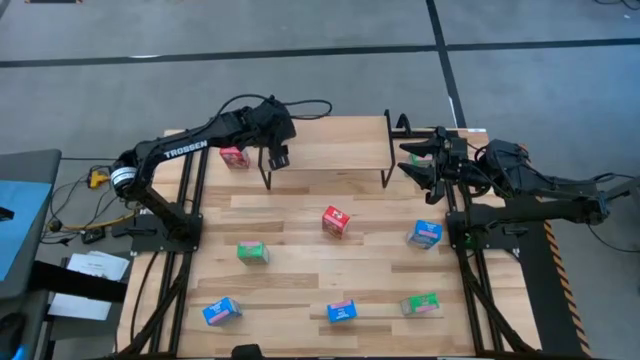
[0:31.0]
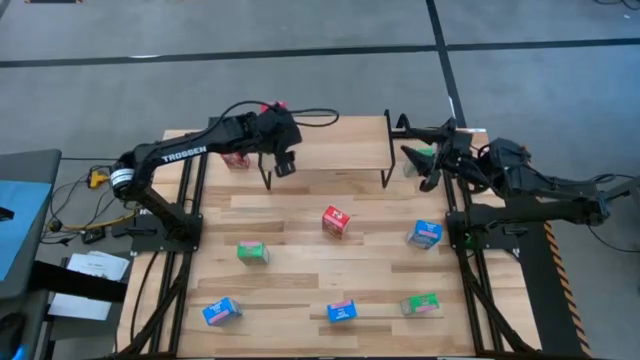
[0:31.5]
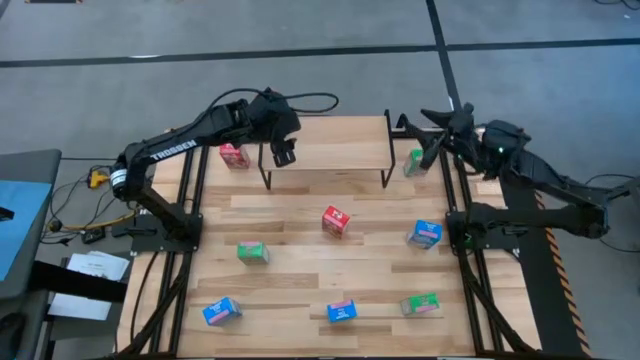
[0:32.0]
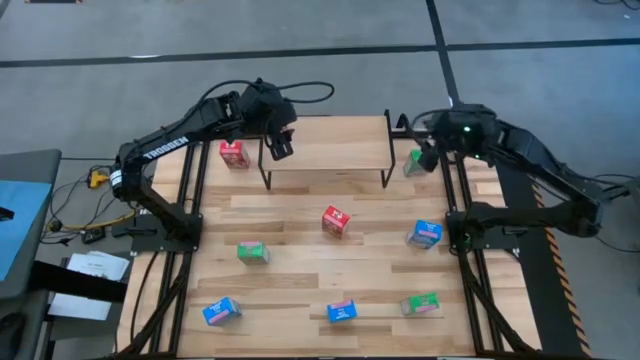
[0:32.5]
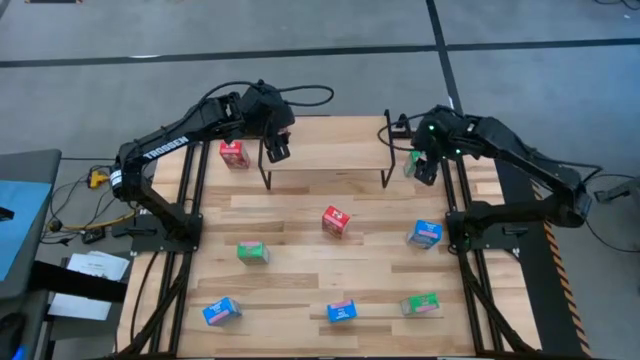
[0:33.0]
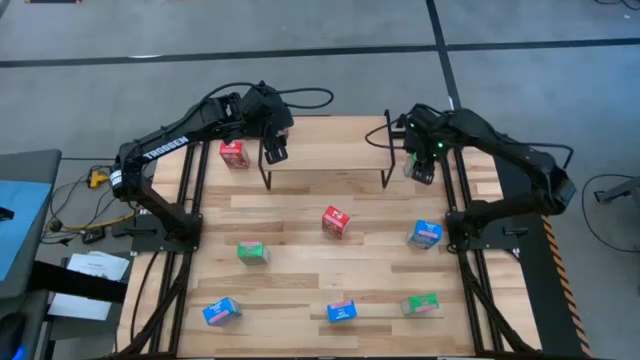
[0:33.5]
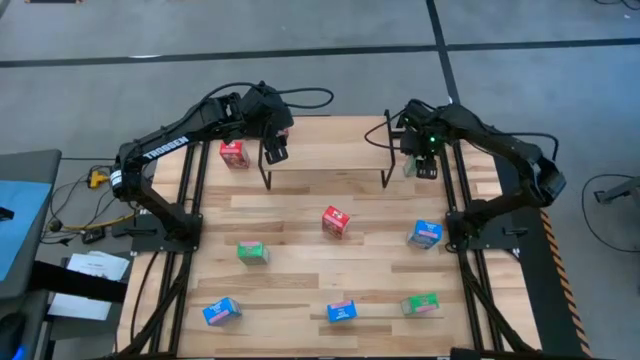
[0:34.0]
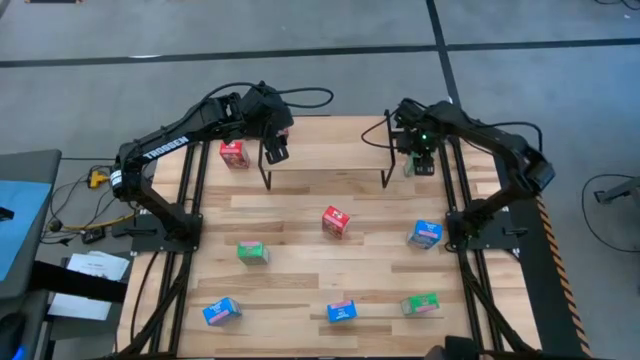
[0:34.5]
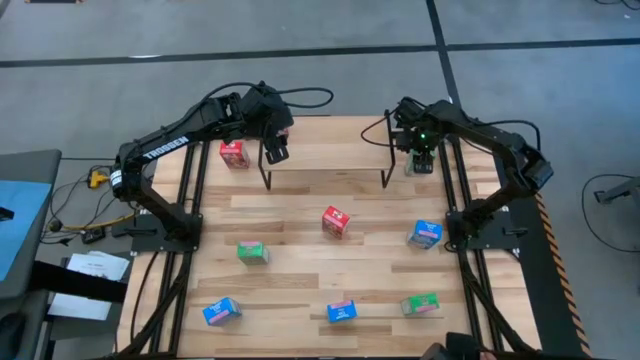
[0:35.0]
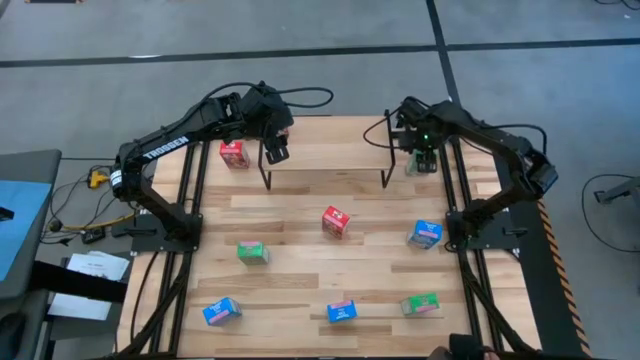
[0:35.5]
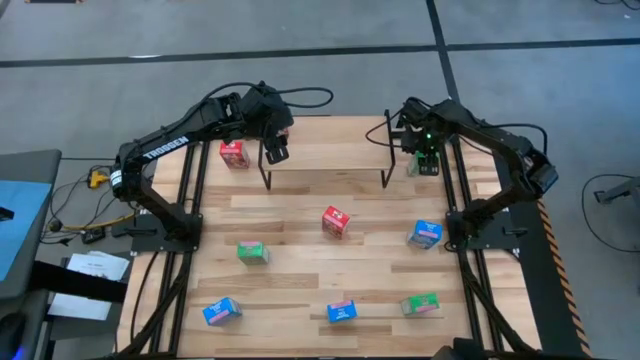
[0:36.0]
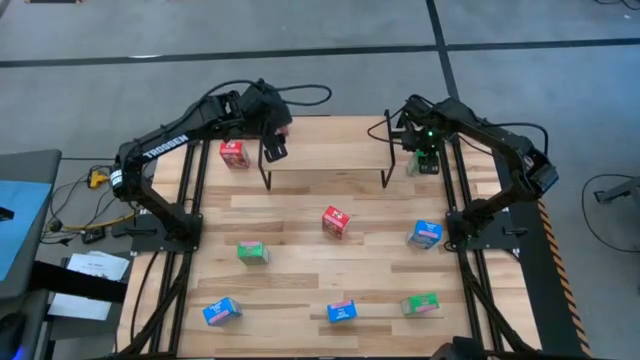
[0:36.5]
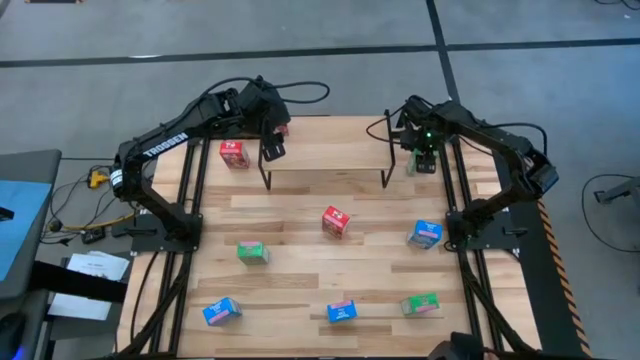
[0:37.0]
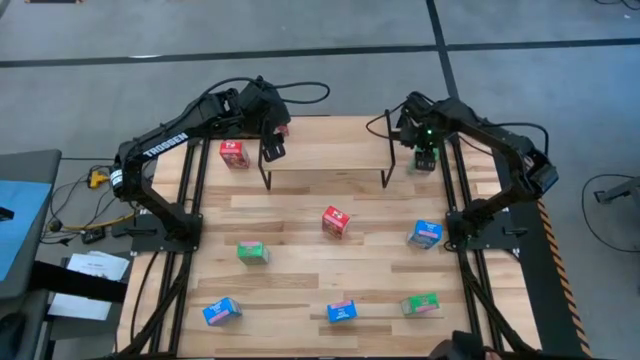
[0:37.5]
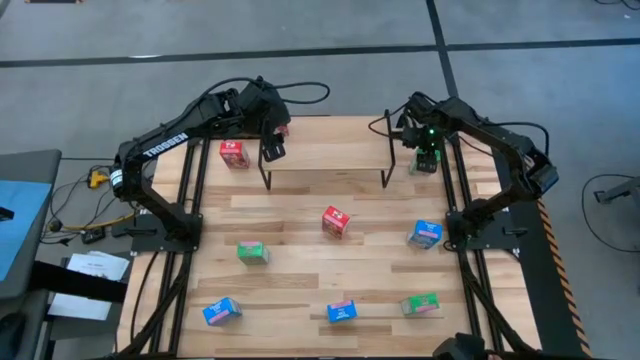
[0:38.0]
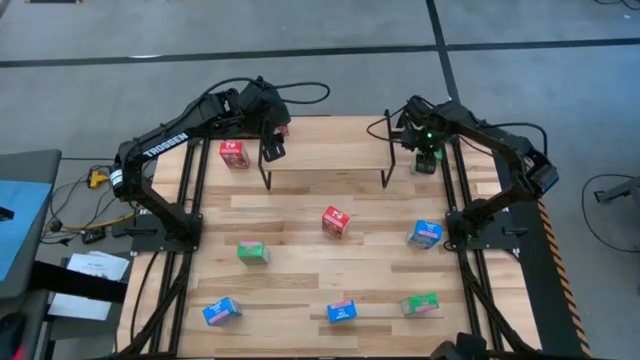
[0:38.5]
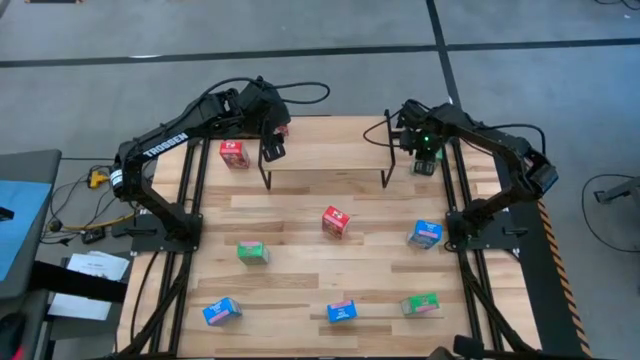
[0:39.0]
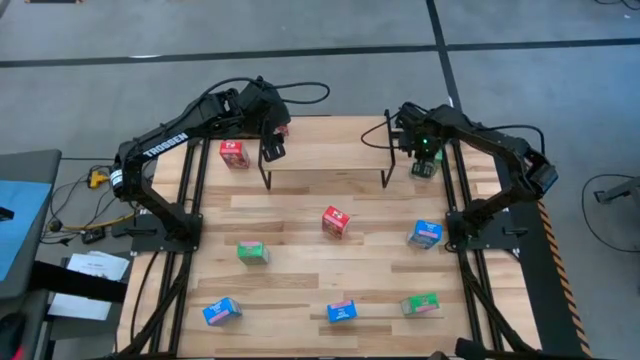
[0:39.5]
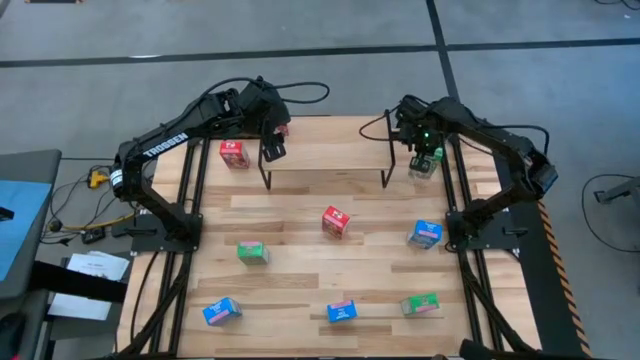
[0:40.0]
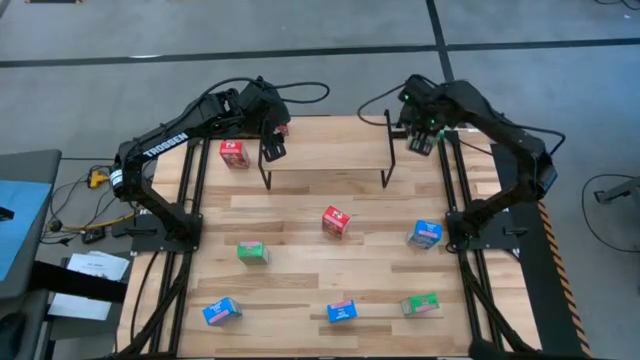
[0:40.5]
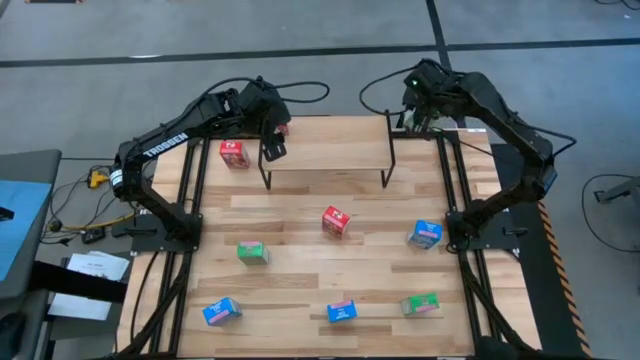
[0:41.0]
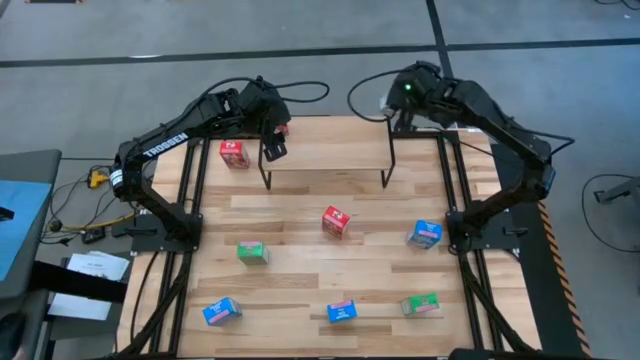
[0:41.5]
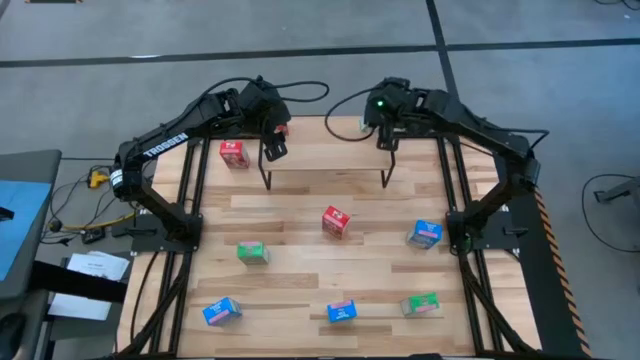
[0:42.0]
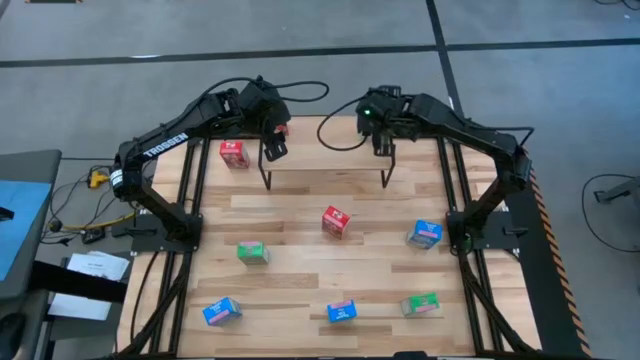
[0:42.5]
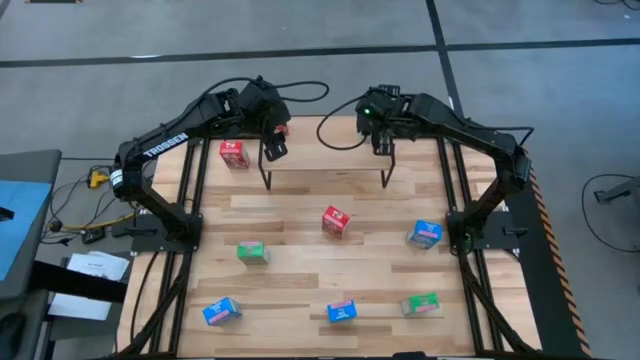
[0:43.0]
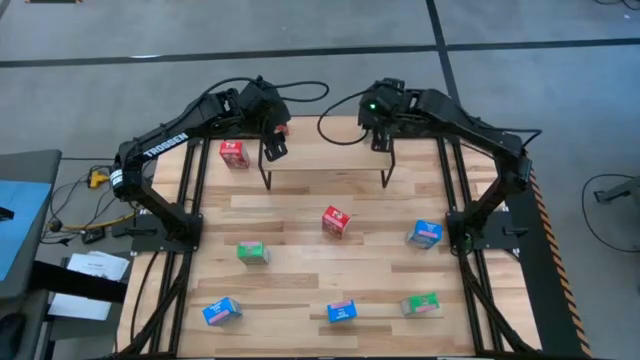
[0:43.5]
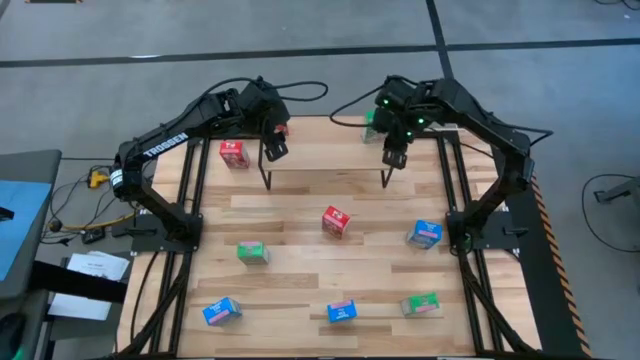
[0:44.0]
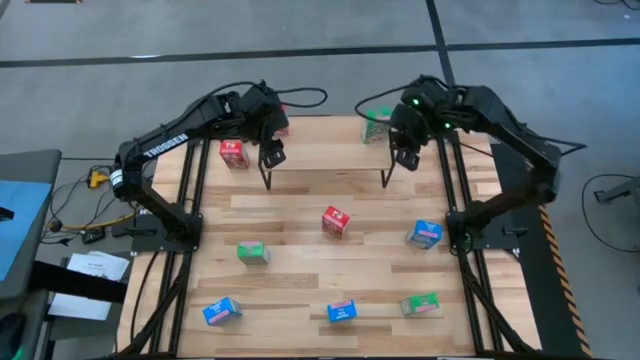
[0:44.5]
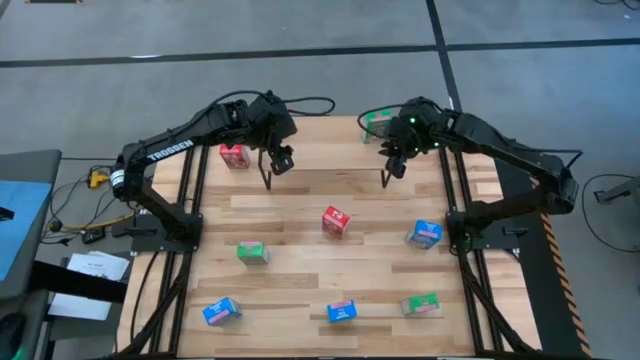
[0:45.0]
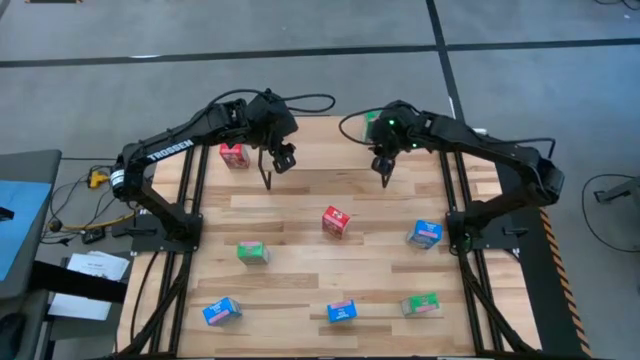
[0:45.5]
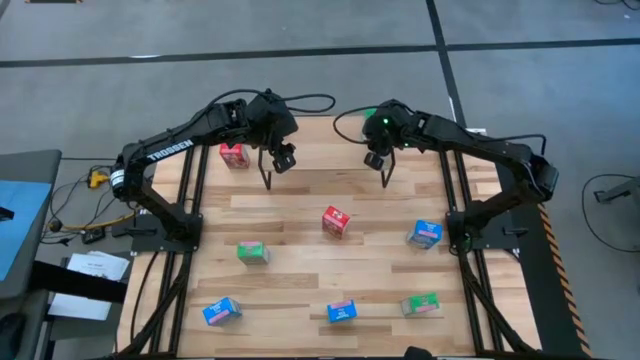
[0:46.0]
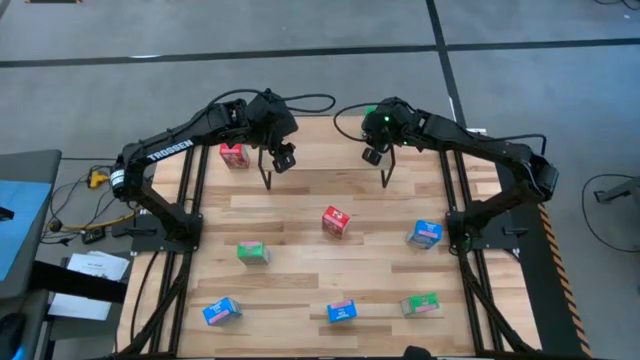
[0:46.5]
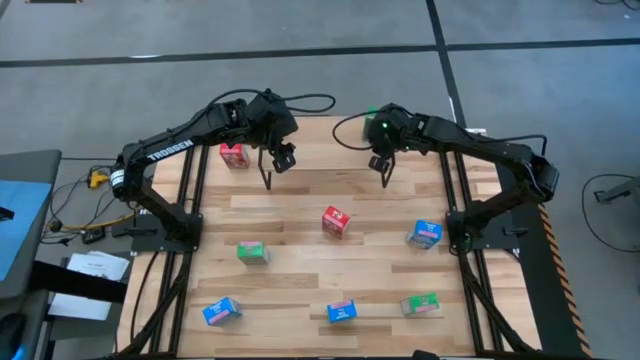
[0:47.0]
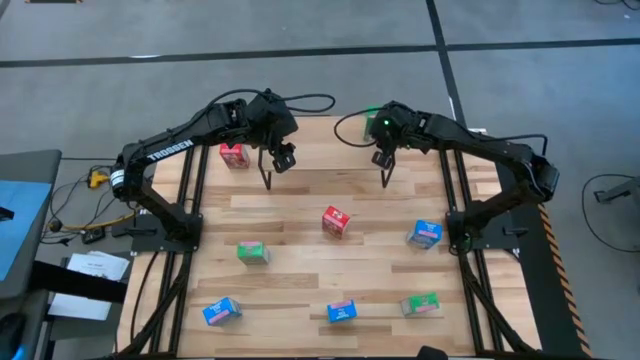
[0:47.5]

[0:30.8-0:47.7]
Task: Stack cereal on shelf
Put the top right green cereal box on the shelf

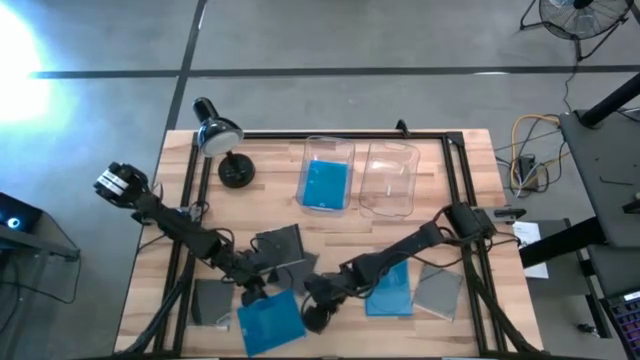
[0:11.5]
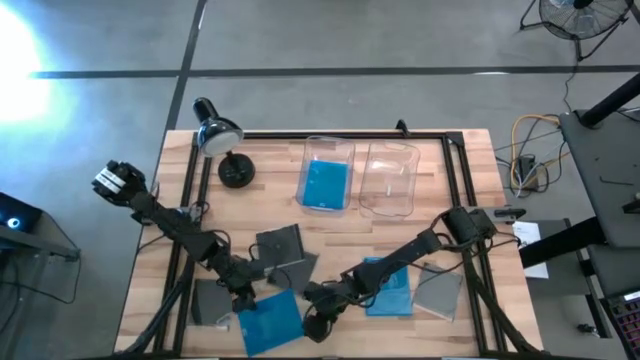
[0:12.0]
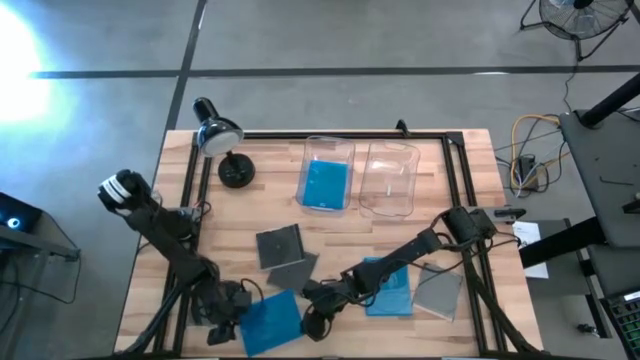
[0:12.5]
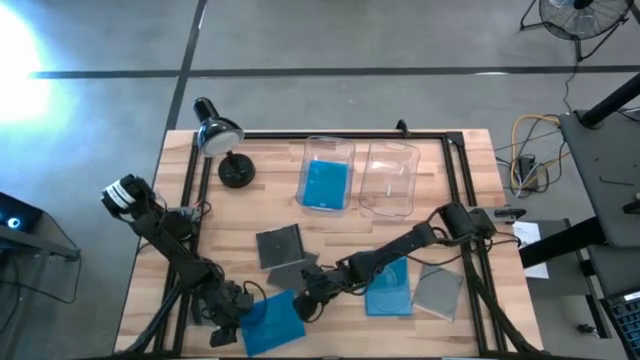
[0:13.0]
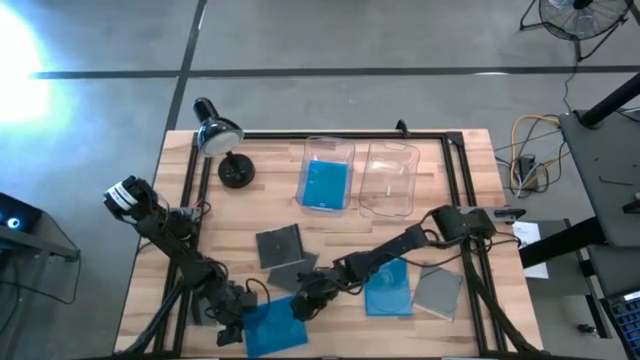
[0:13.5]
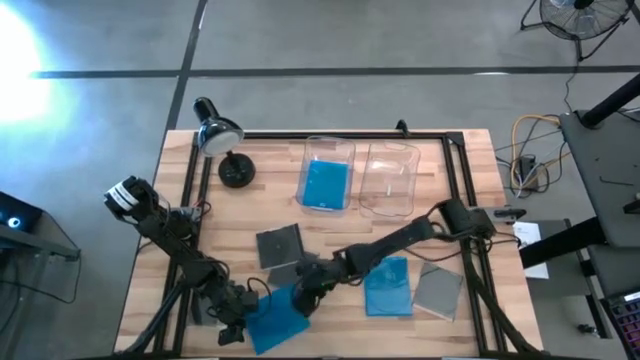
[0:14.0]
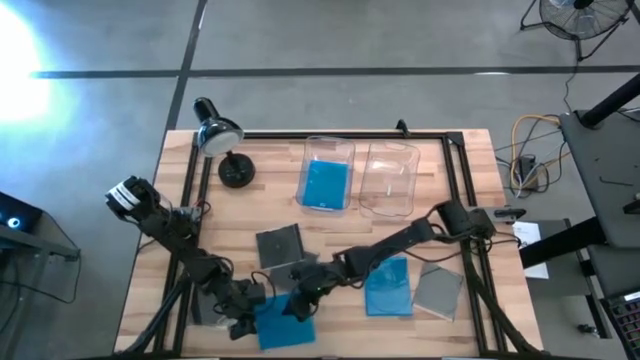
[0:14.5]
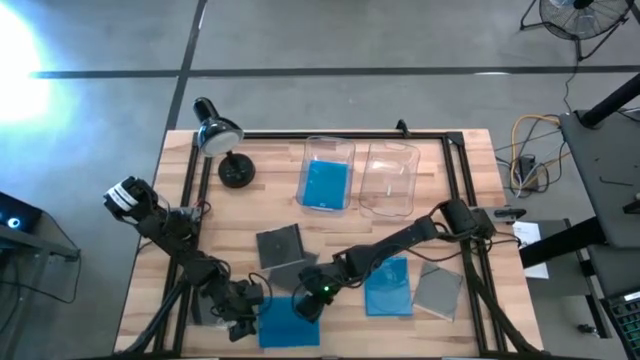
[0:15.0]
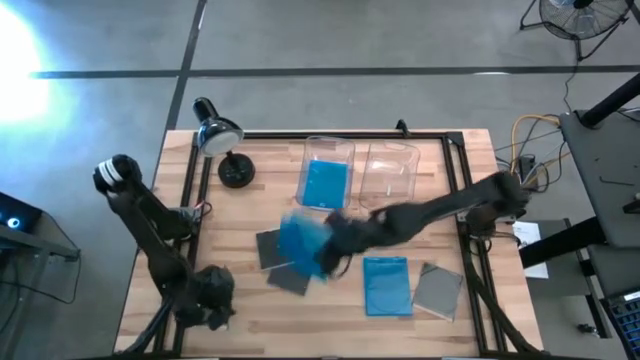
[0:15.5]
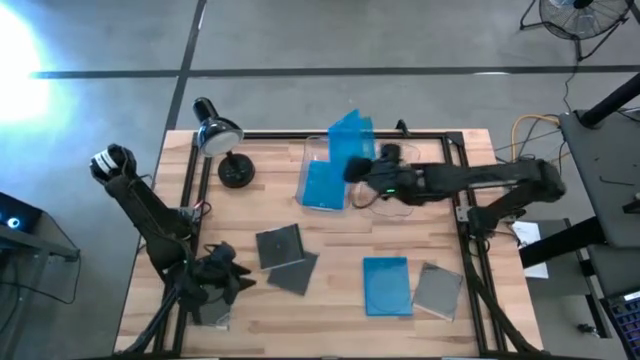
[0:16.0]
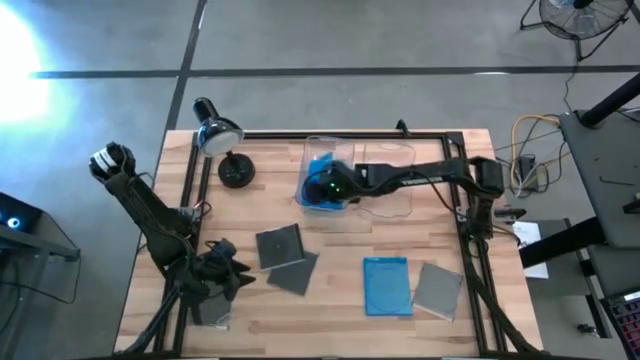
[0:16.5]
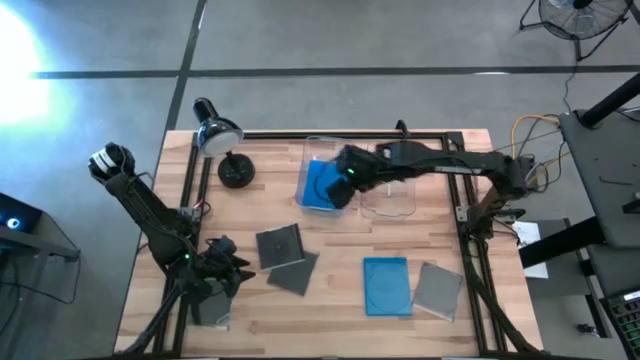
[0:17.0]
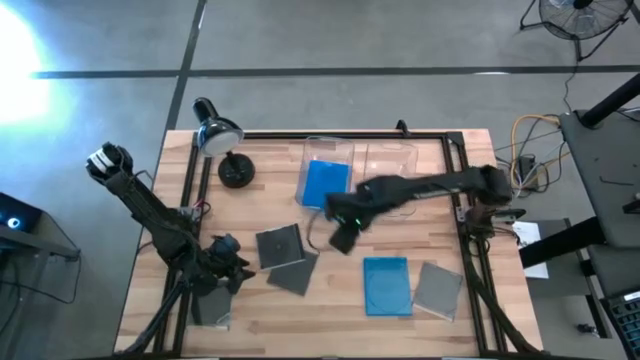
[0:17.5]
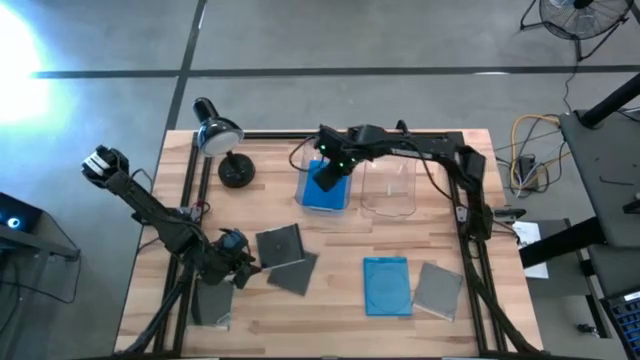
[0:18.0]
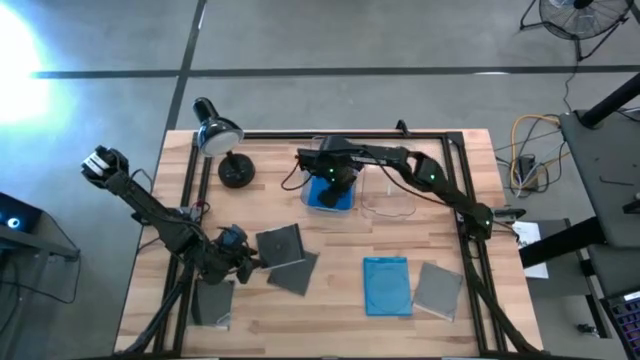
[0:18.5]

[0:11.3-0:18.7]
Task: Pick & place jewel cases by type
Put the blue CD case into the left transparent bin
